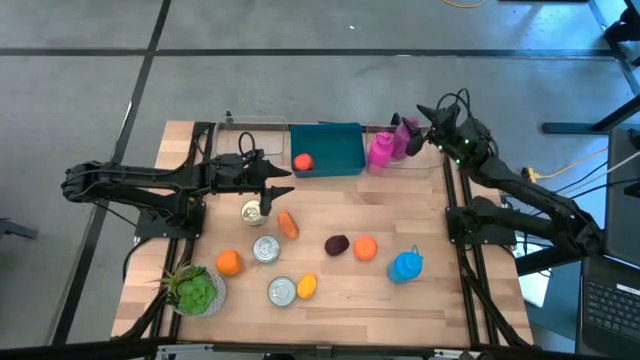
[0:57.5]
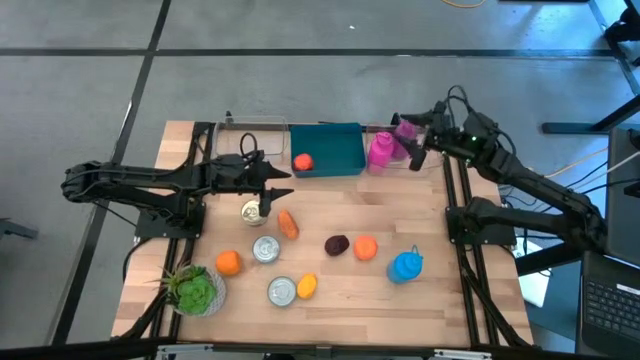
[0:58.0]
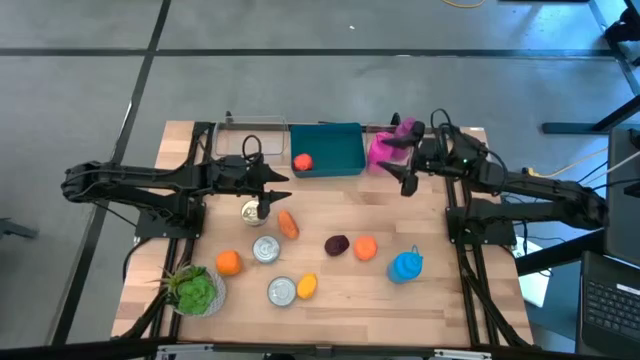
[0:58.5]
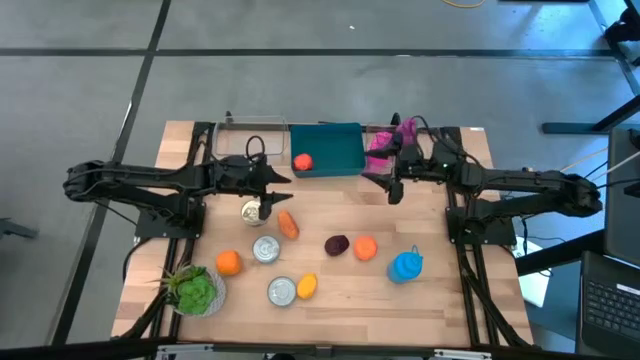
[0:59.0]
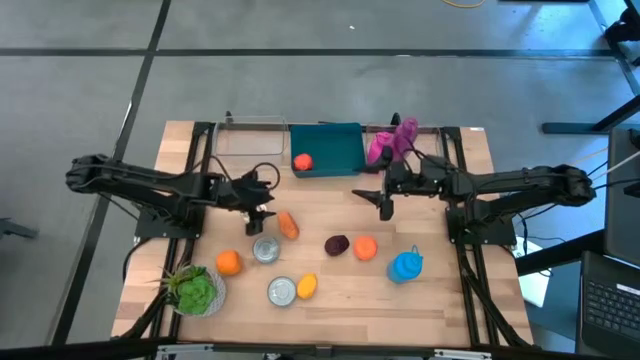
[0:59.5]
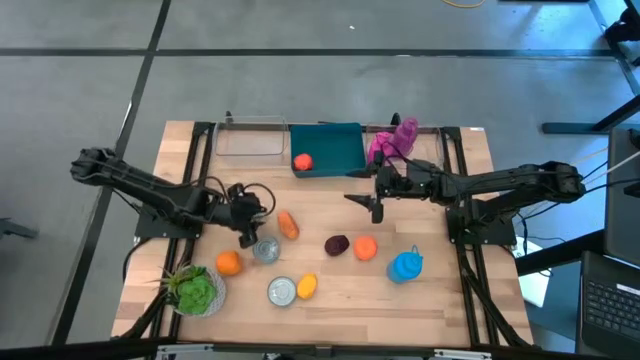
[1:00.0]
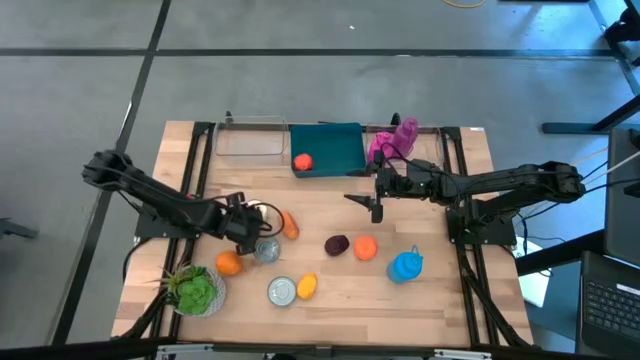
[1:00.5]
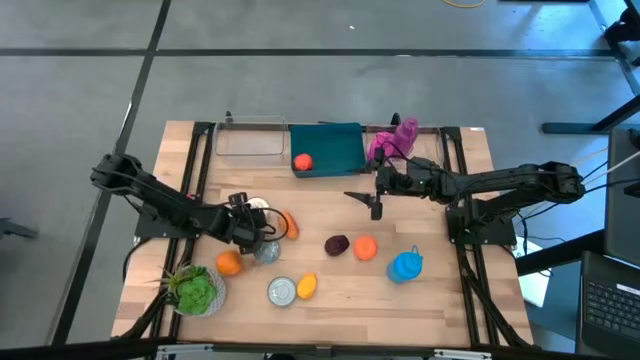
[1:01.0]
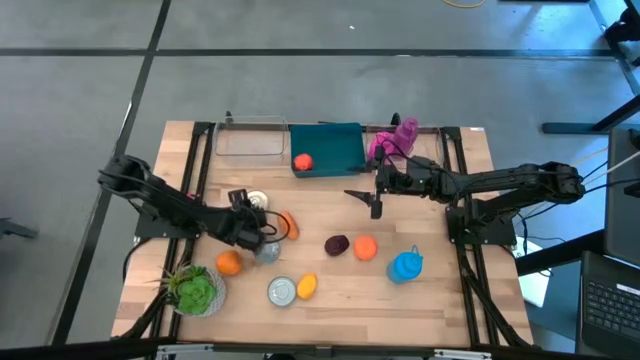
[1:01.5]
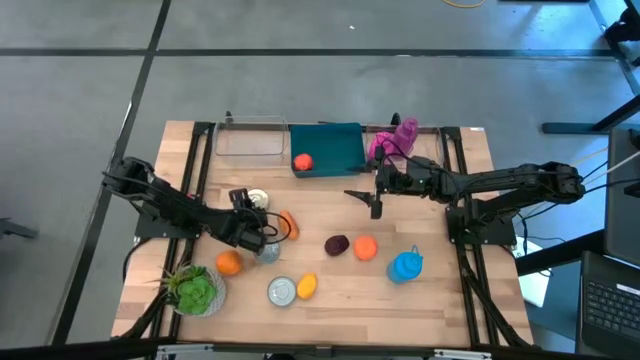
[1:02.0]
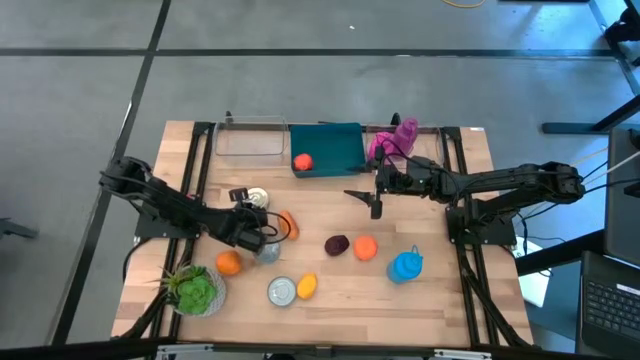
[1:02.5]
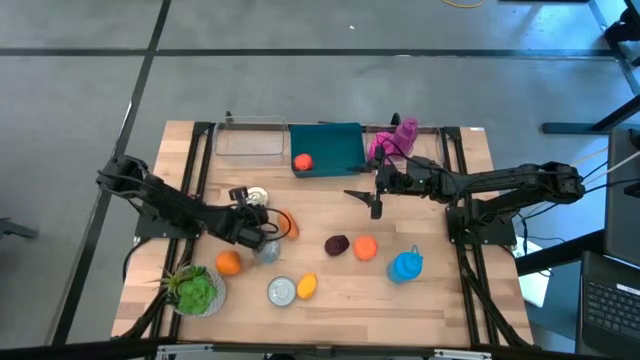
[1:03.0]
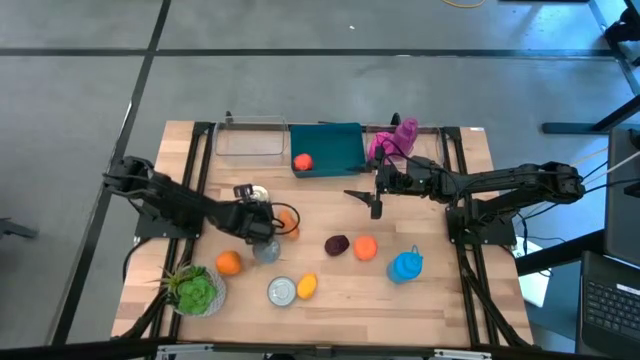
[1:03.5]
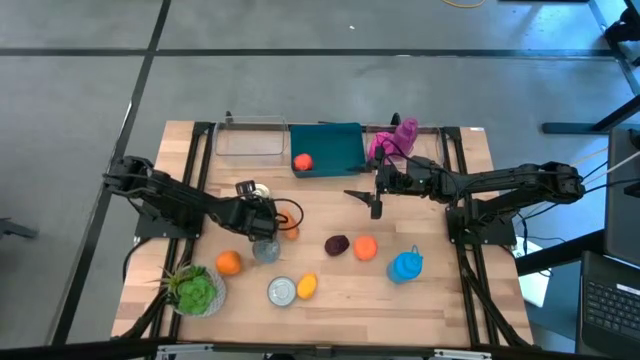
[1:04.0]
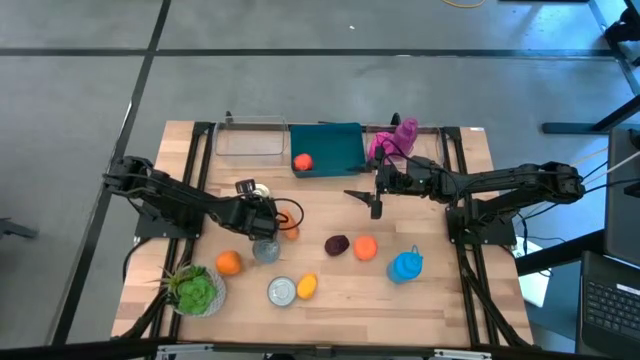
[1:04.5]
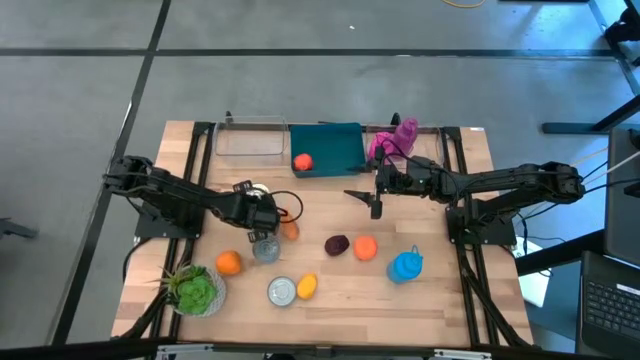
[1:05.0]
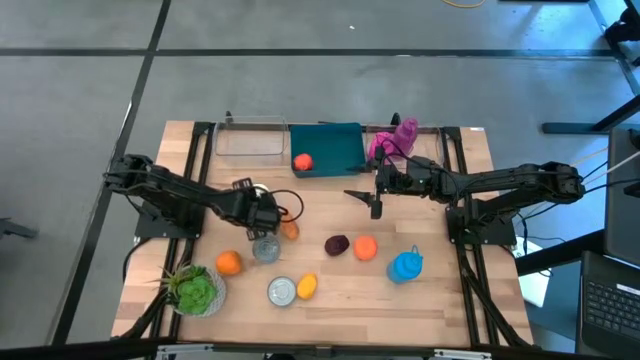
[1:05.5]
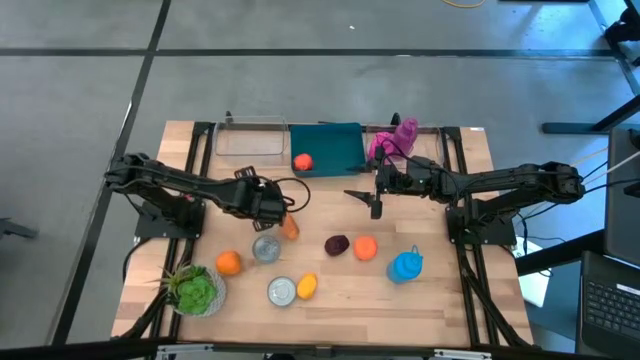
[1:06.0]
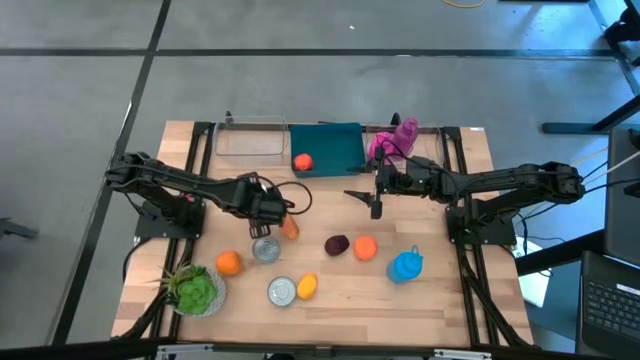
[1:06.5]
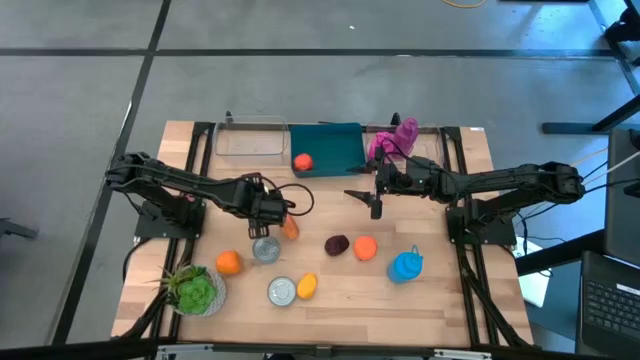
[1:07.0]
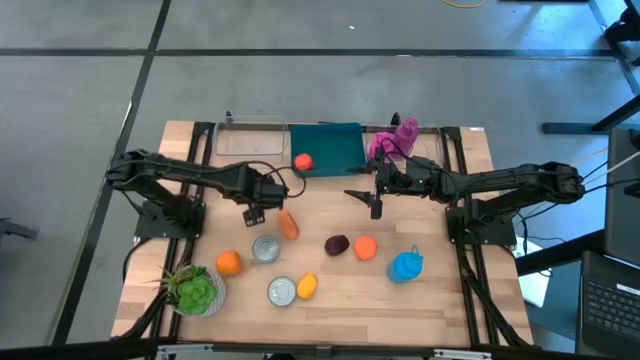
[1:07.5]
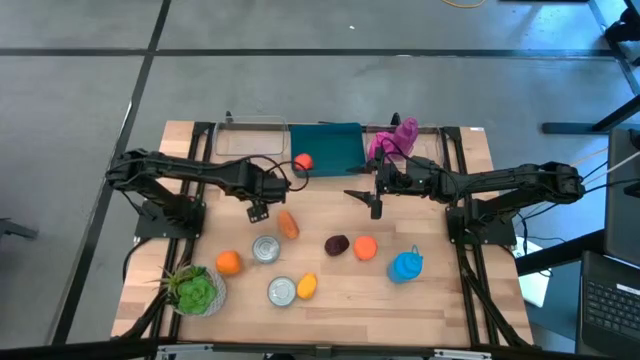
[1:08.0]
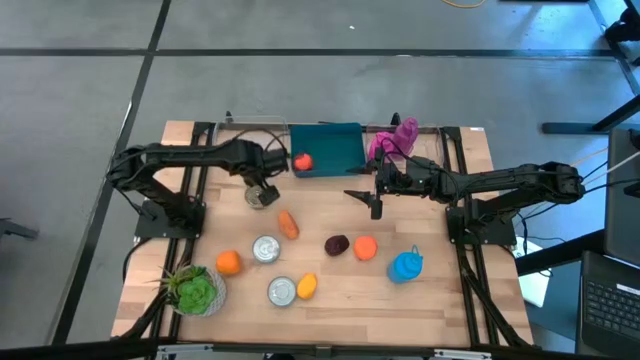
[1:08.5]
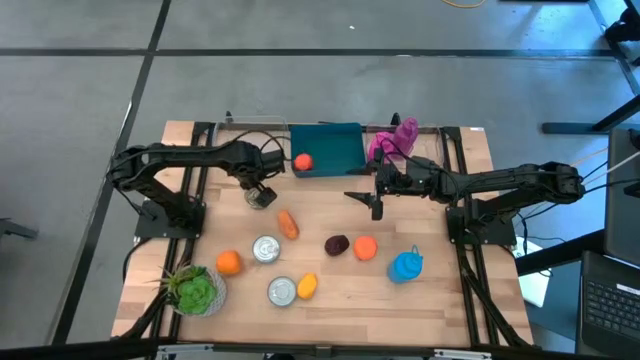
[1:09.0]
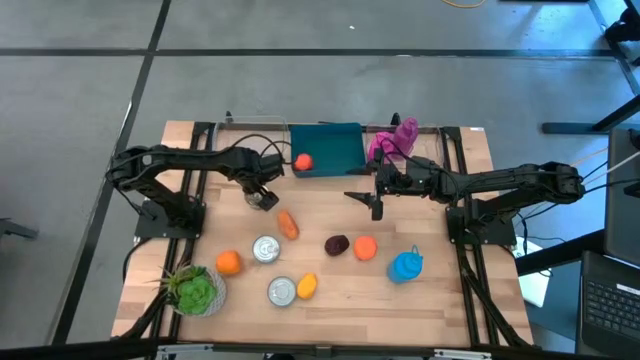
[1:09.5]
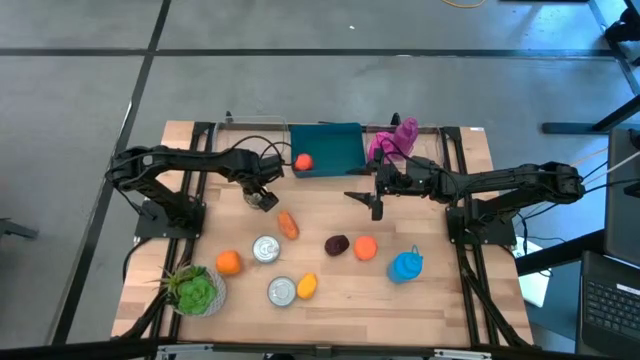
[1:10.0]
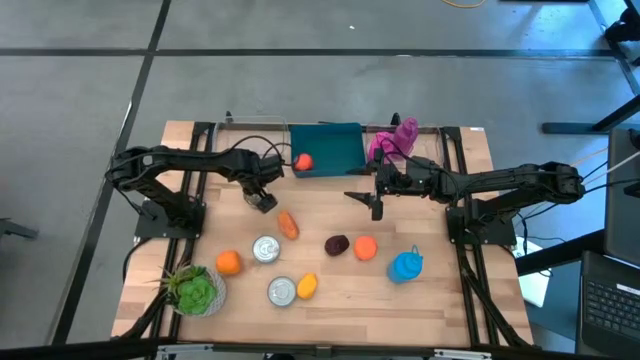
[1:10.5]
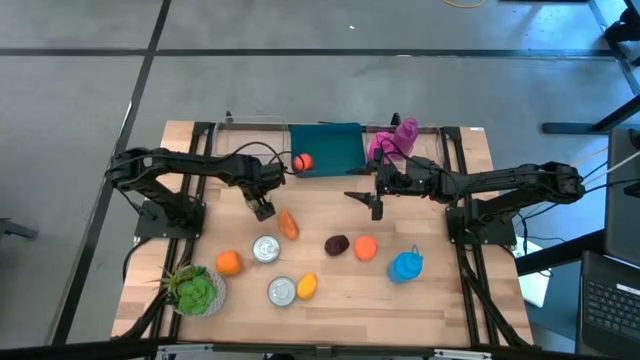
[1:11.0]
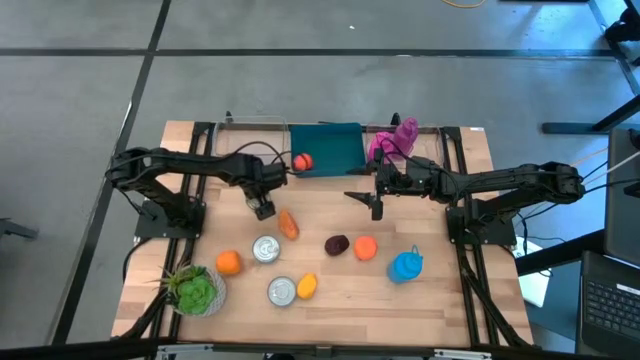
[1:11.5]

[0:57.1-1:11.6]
Task: Pick & Place Food Item
Put the top blue pink tuna can into the left transparent bin

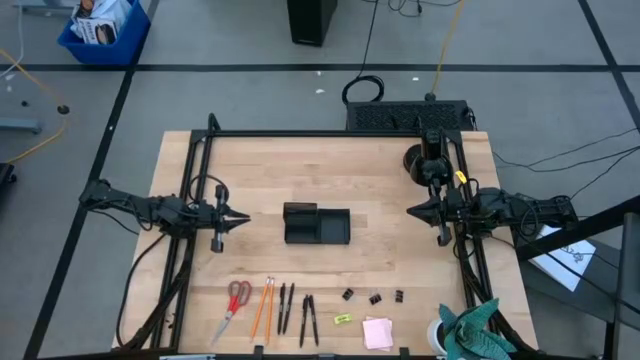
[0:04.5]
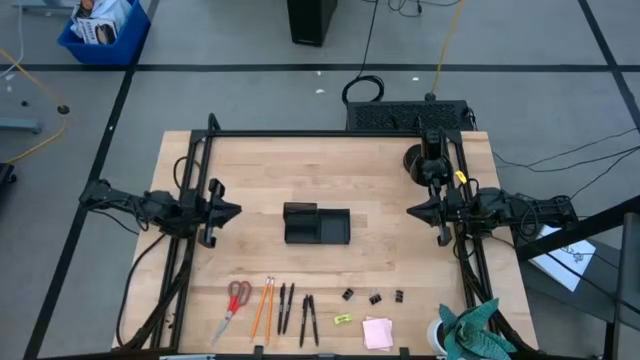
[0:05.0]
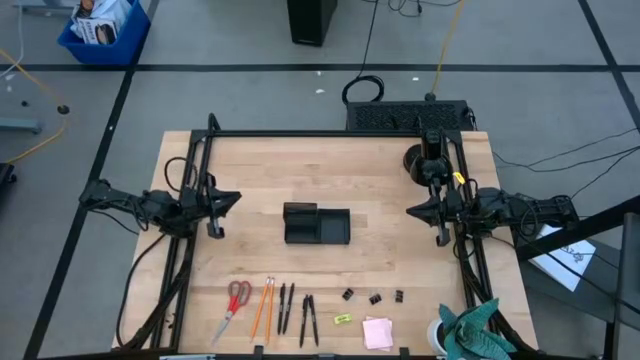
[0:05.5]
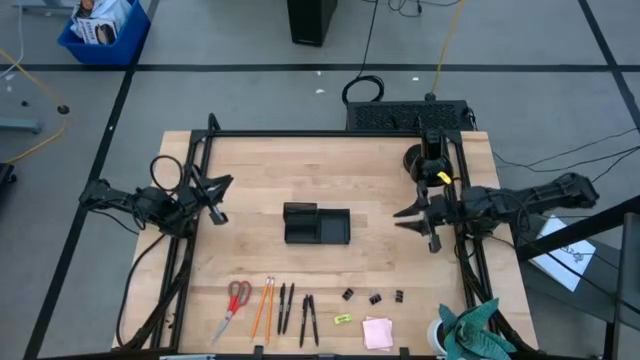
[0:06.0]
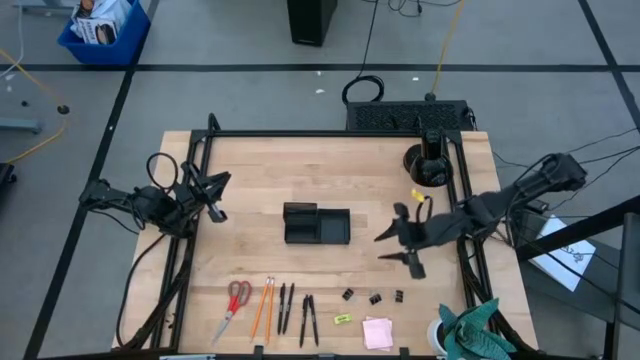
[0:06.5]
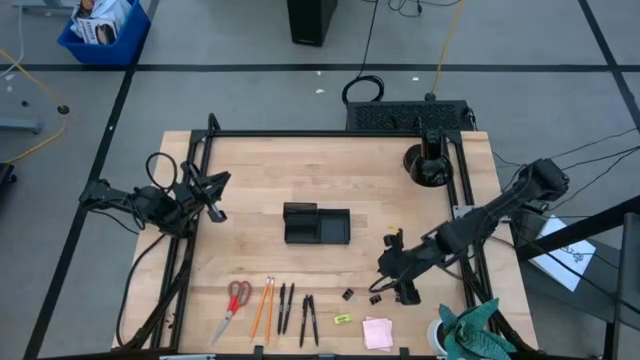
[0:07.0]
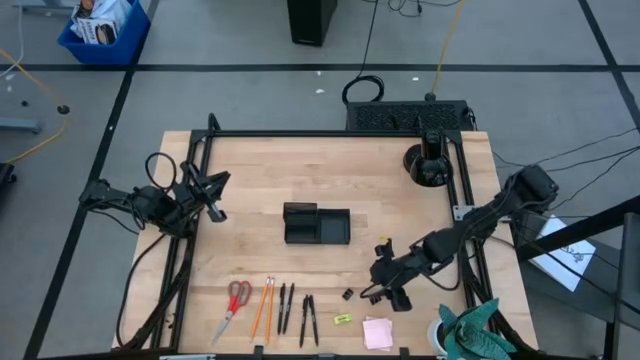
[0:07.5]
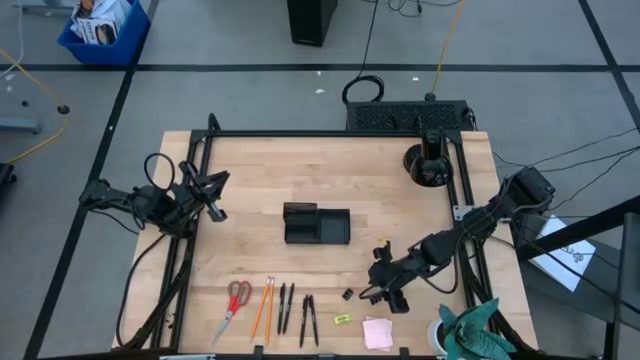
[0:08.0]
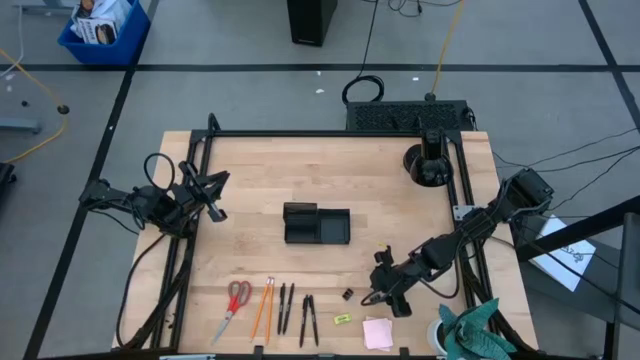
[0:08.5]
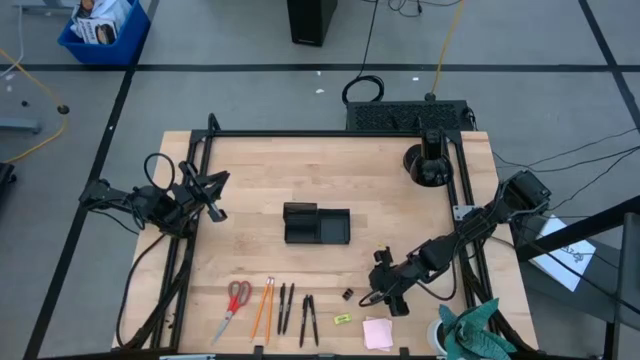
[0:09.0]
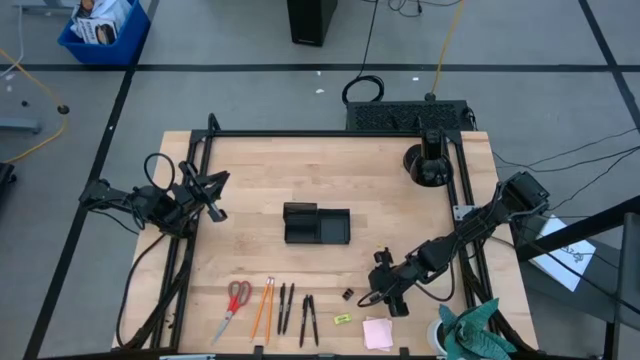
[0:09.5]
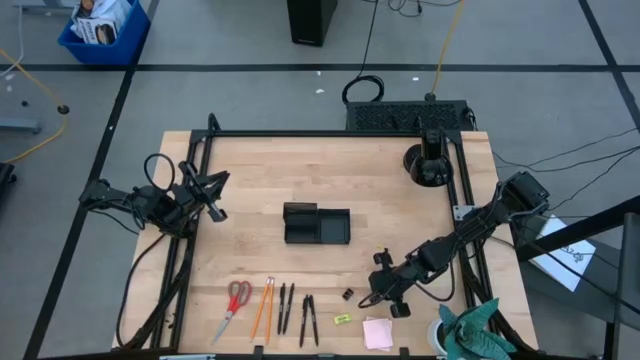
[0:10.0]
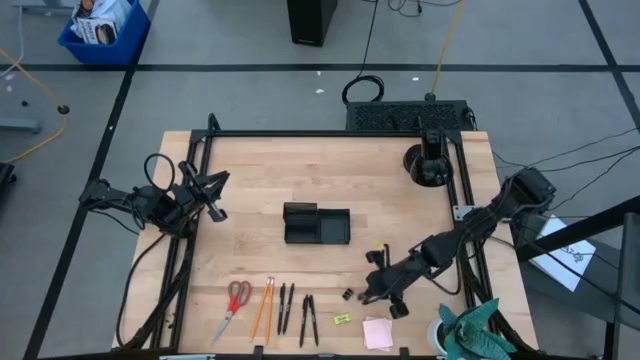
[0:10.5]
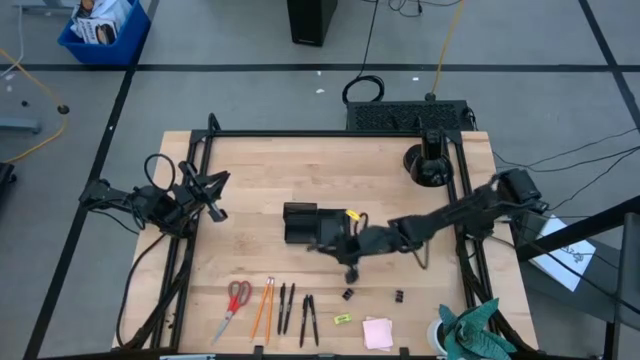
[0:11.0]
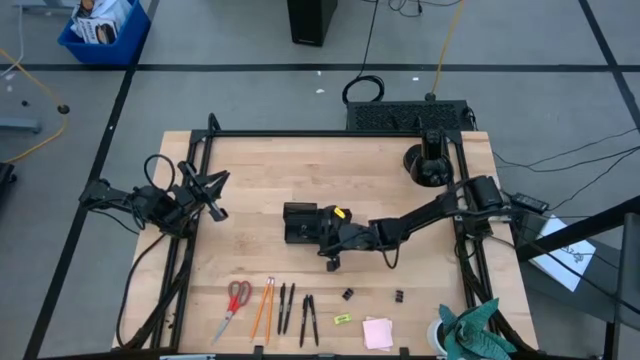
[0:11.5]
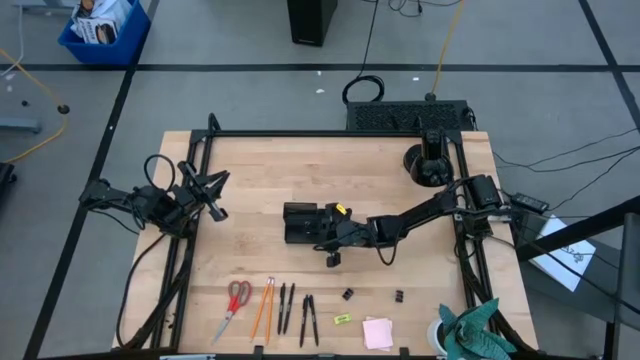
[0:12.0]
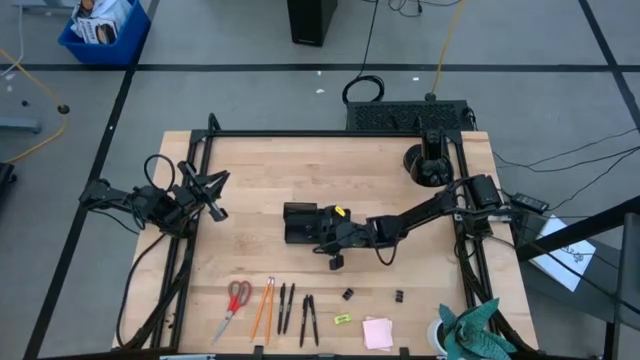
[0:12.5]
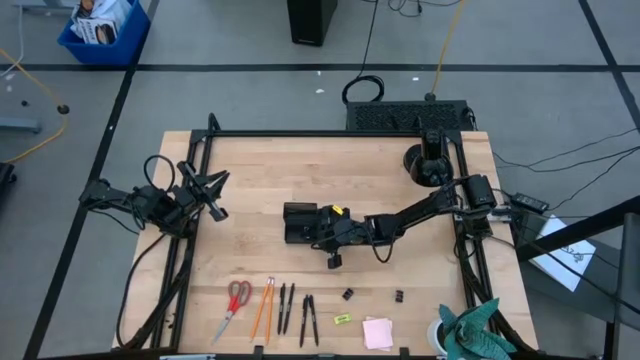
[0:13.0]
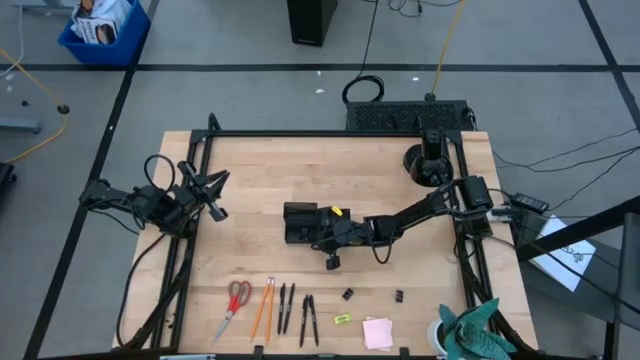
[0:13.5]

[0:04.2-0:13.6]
Task: Pick and place office supplies into organizer
Put the black binder clip into the black desk organizer
